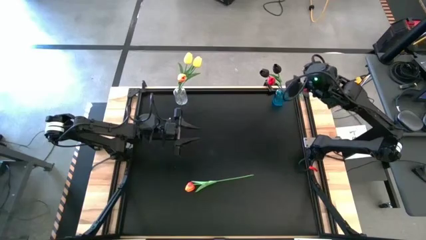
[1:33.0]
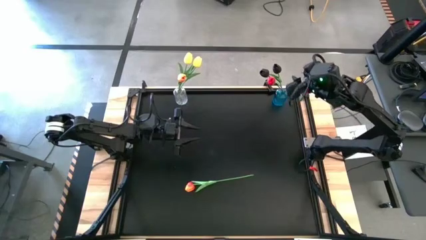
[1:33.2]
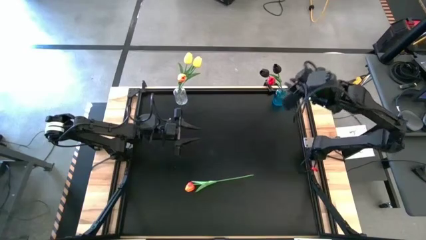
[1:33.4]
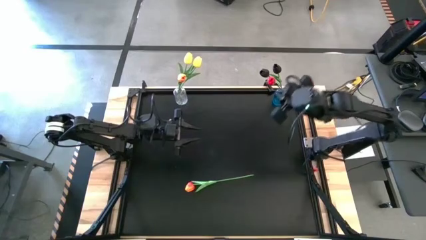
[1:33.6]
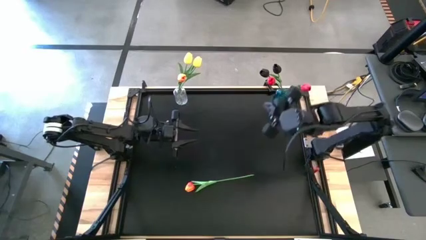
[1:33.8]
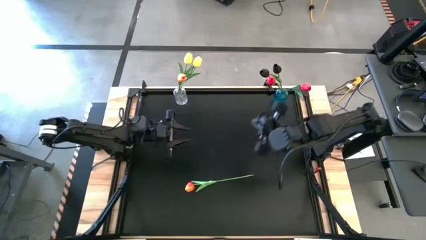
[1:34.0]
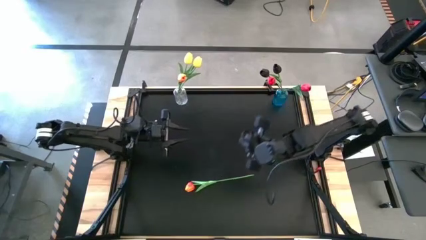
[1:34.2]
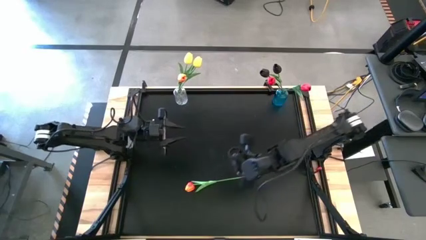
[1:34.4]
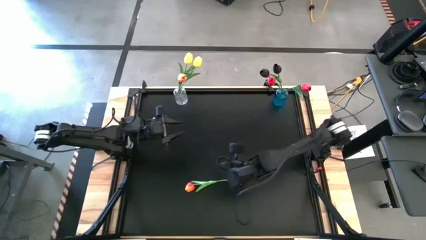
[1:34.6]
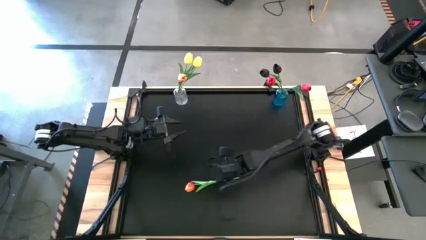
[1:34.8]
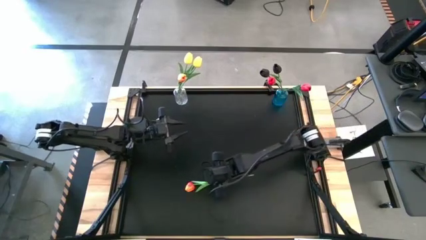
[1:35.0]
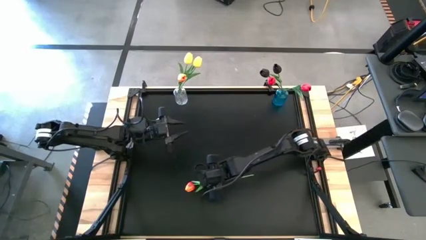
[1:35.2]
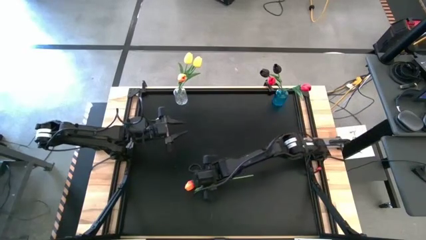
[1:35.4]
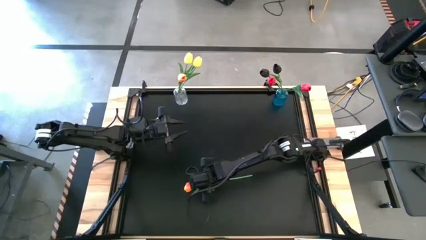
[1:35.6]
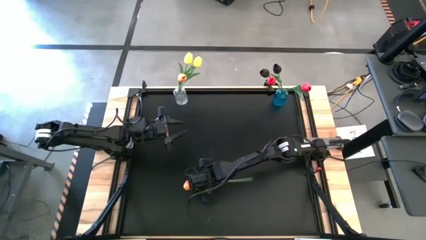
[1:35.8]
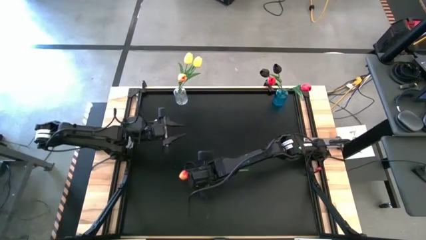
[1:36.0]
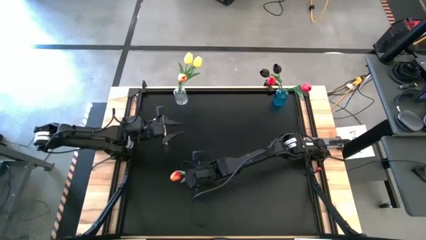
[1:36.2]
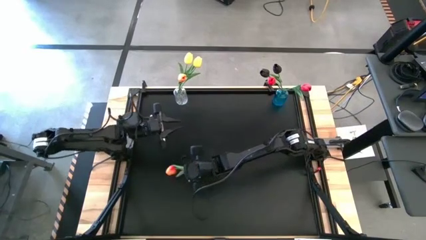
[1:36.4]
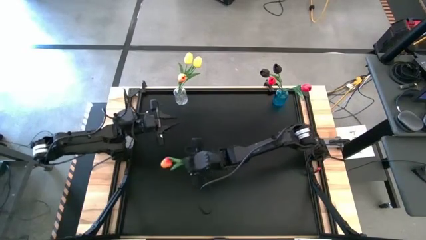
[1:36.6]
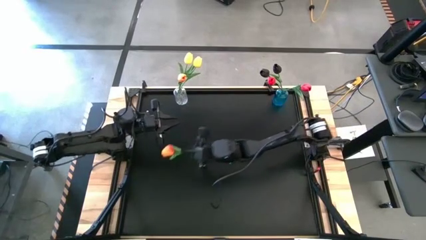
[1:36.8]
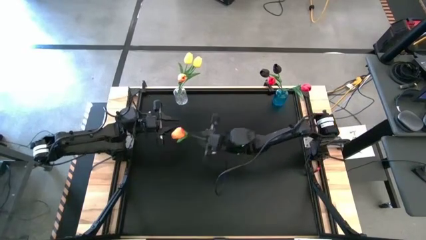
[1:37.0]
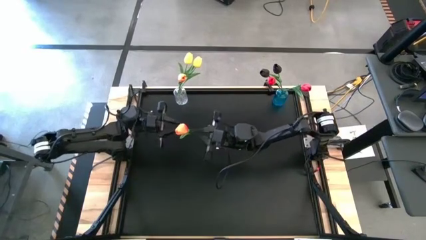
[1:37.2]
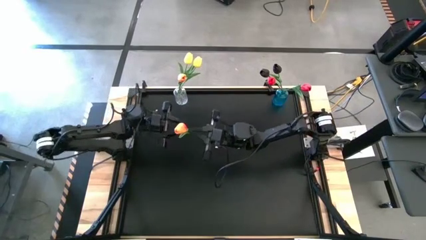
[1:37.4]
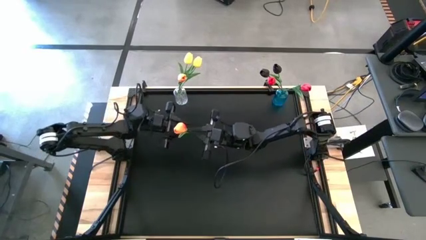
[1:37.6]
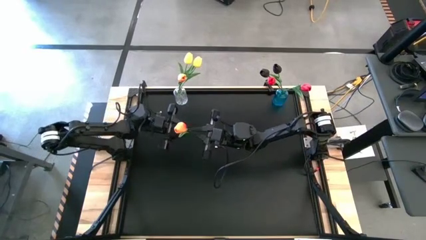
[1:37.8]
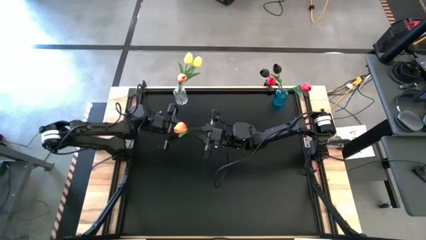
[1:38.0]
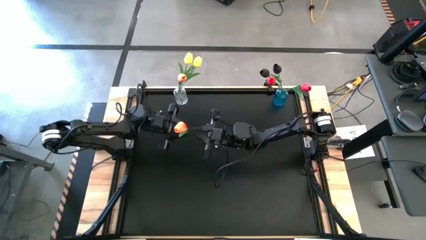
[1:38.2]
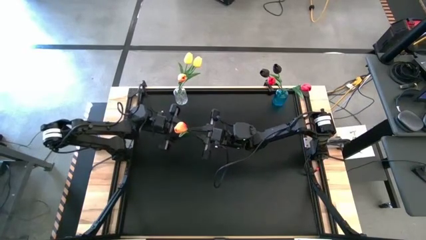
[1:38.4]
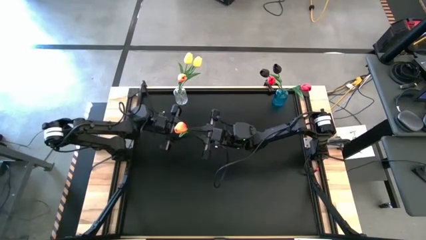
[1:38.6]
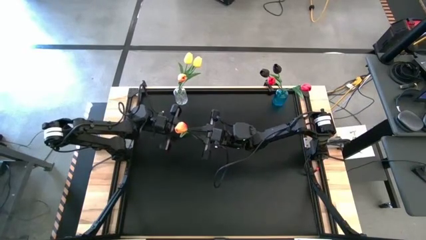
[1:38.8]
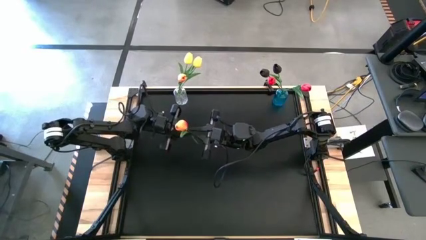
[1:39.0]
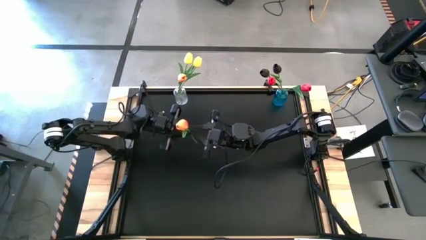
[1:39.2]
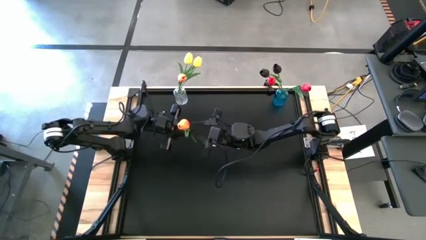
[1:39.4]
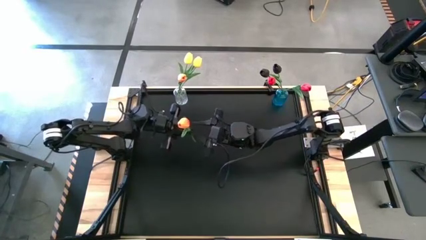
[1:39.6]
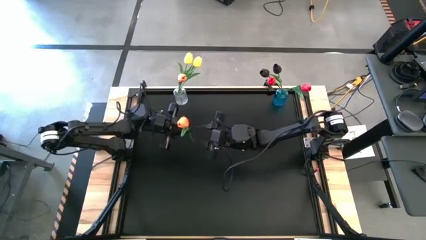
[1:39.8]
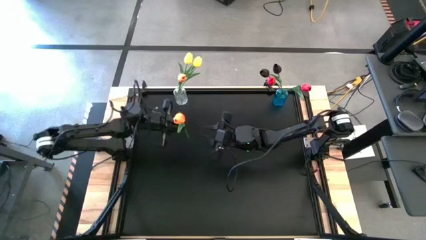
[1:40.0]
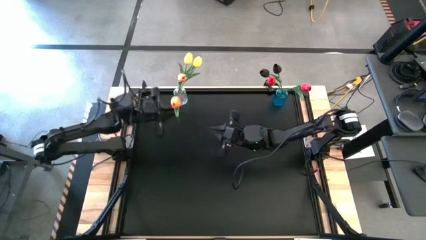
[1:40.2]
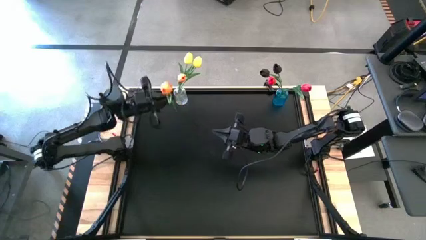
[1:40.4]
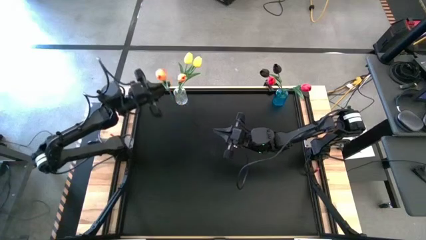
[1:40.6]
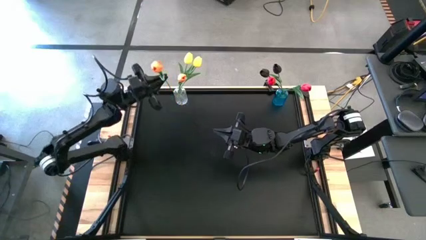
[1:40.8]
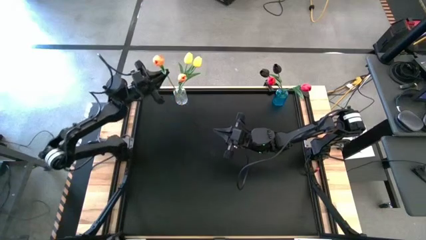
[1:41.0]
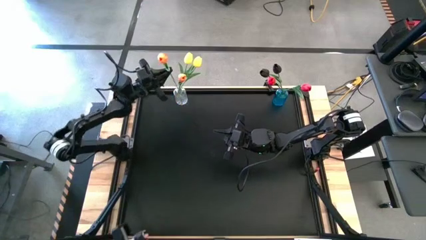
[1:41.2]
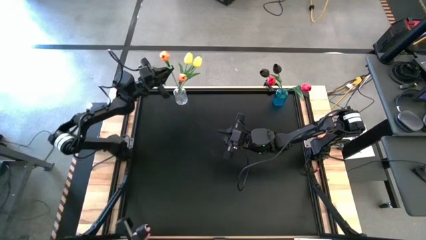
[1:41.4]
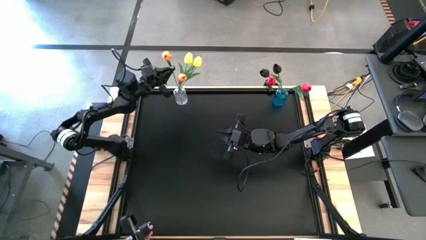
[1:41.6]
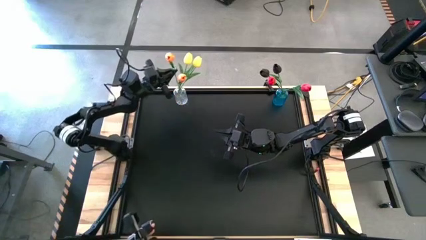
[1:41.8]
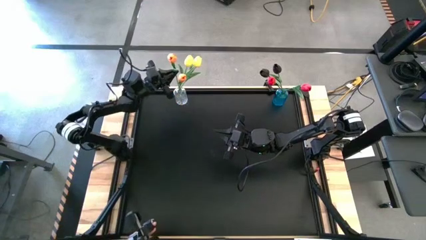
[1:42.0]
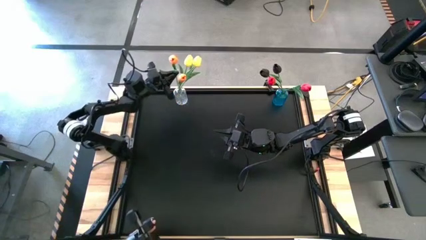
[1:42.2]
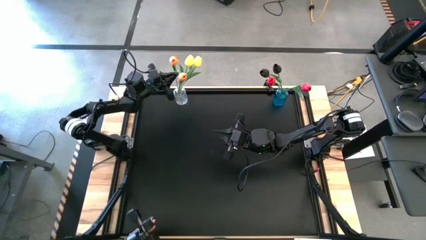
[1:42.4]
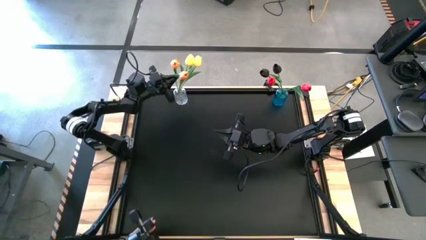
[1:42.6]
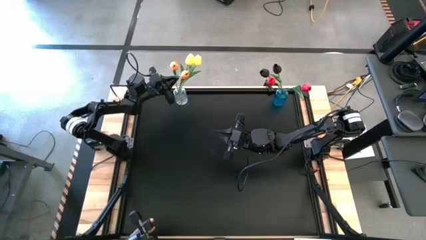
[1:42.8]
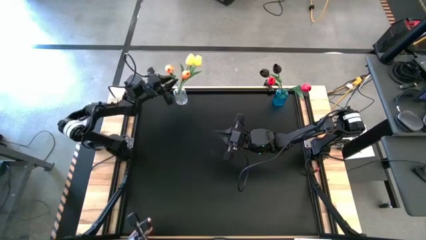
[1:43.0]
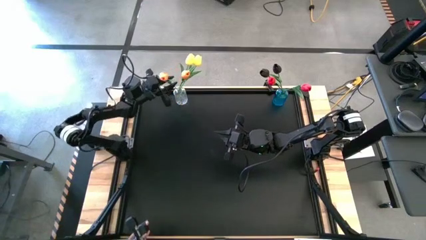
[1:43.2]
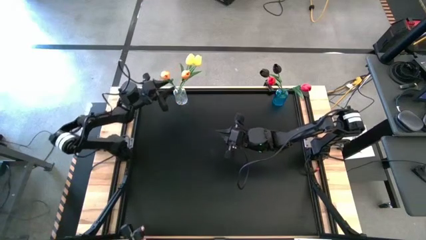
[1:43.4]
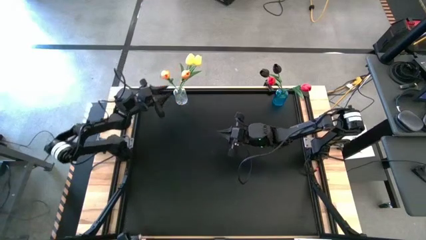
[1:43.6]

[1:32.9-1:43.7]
Task: Sort flowers into vase by color
Put the orange flower into the transparent vase

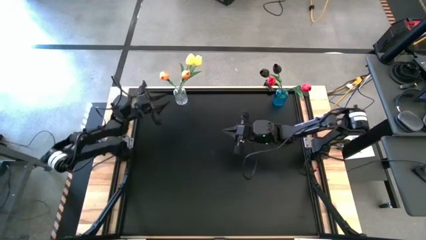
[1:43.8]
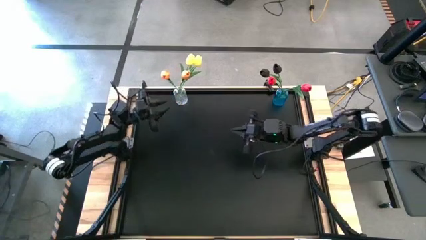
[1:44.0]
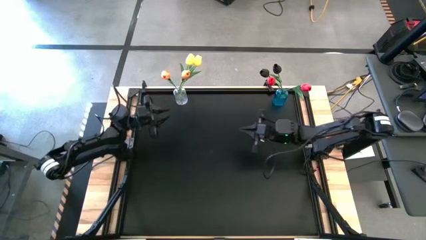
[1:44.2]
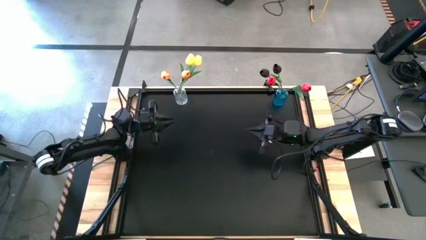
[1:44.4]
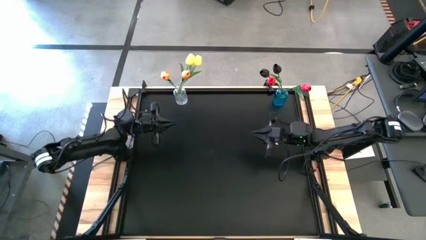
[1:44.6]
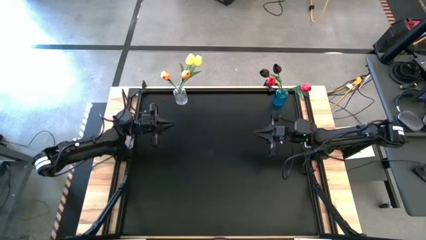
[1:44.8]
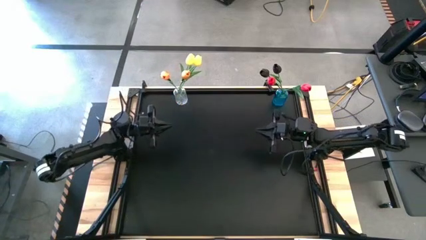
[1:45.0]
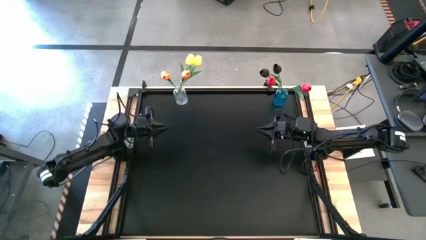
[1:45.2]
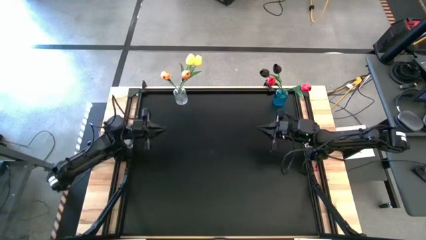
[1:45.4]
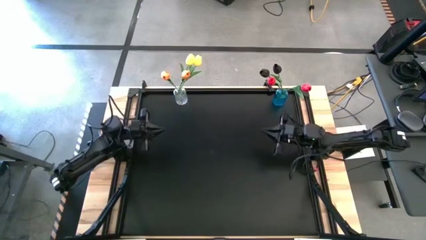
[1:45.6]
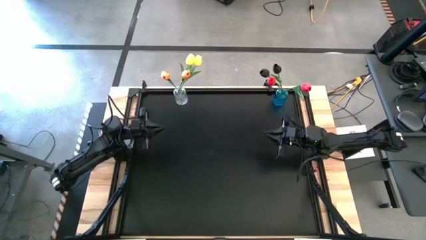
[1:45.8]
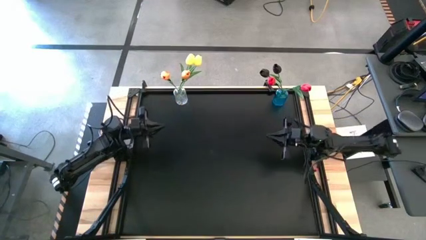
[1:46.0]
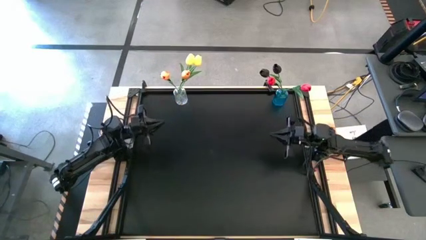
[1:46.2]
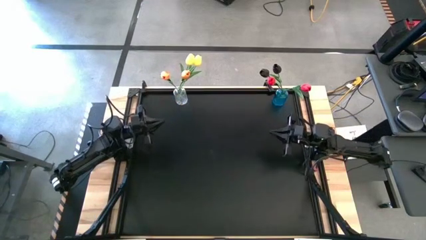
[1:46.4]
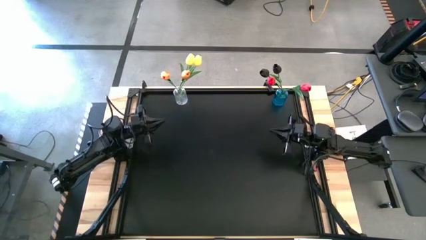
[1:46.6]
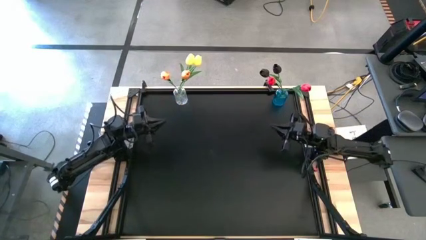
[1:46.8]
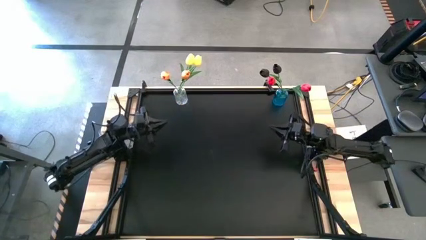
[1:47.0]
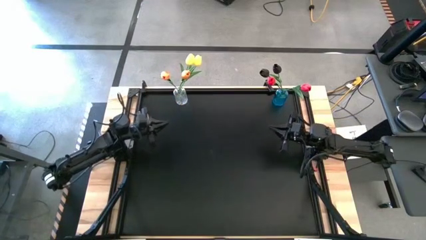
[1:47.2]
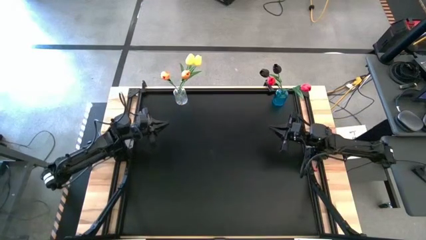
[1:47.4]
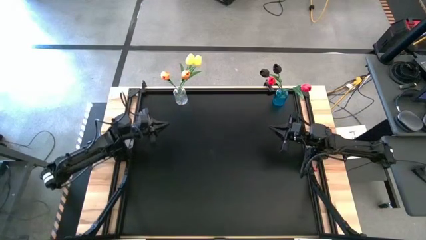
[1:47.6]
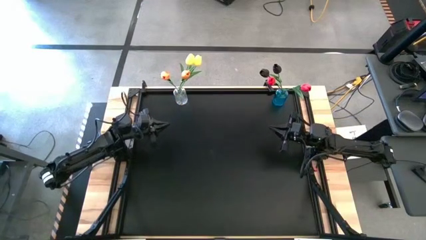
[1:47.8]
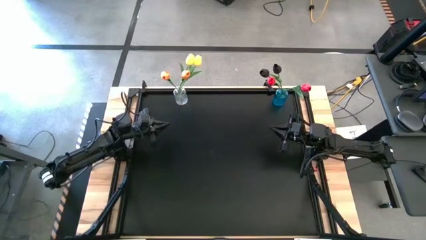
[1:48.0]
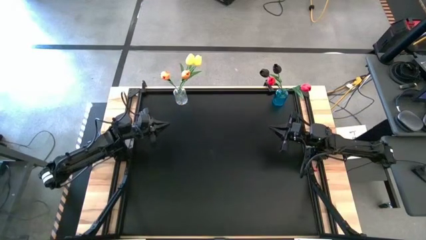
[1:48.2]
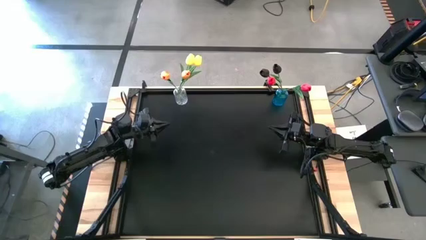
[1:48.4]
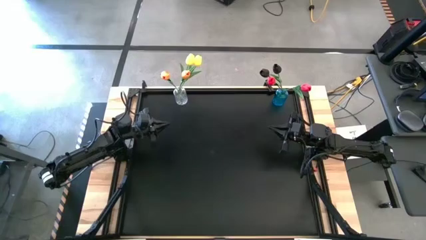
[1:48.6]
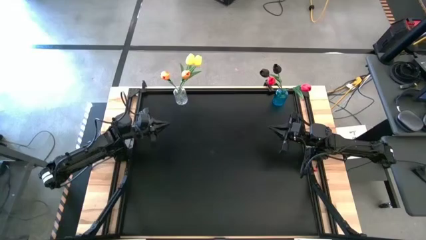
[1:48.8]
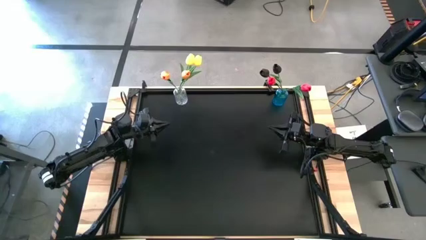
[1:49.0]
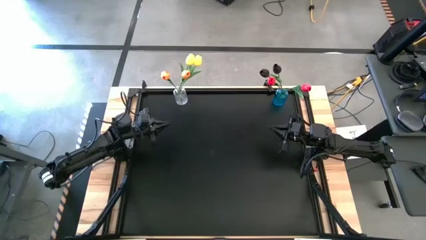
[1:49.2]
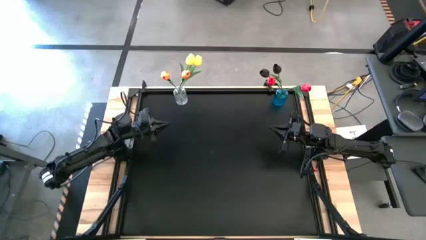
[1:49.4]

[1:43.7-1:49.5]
Return to Home Position
